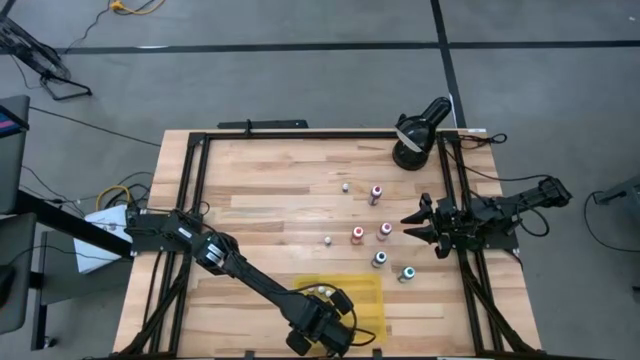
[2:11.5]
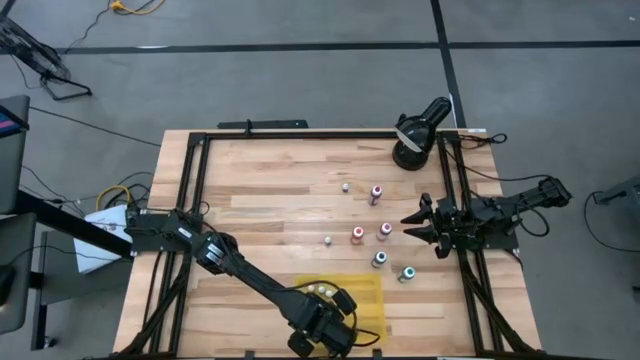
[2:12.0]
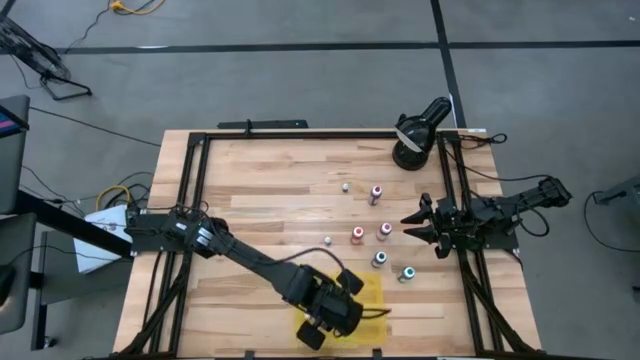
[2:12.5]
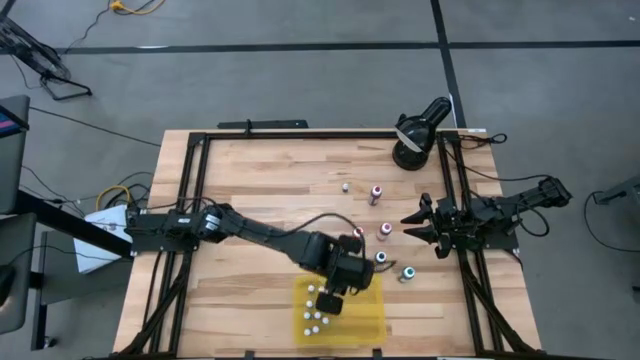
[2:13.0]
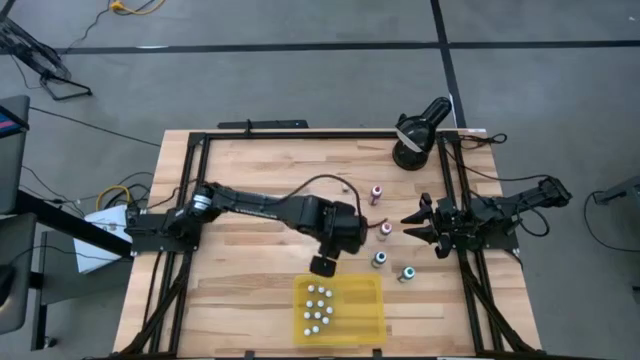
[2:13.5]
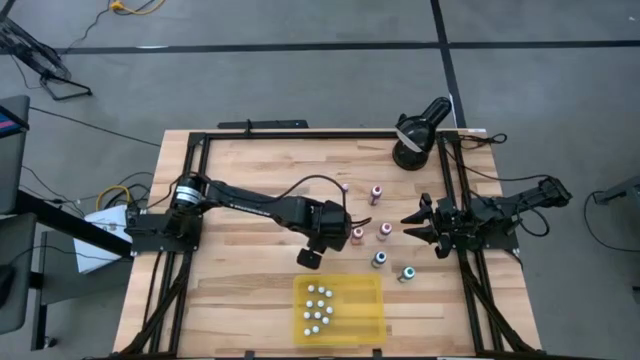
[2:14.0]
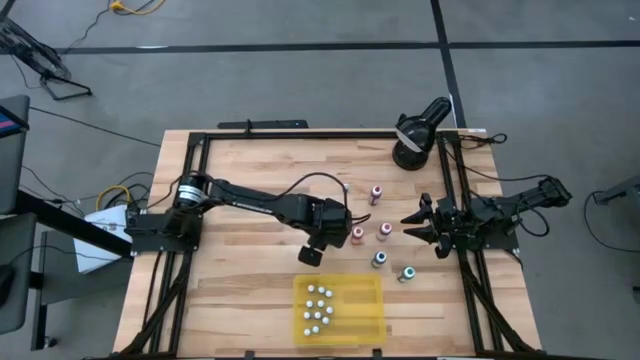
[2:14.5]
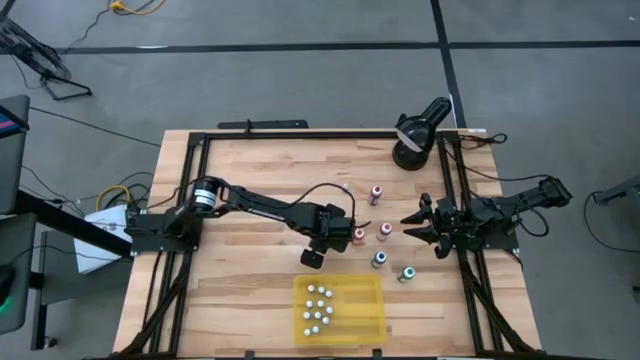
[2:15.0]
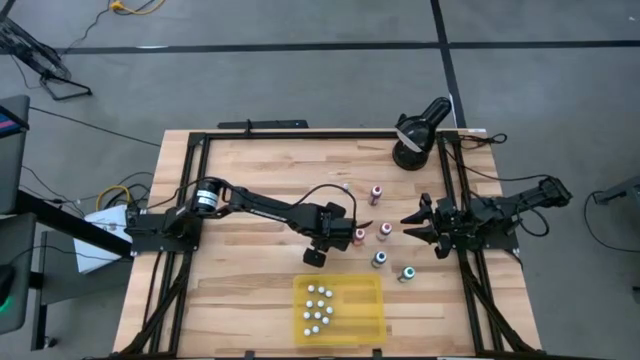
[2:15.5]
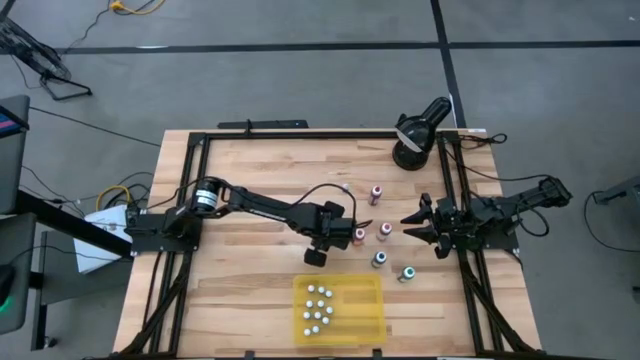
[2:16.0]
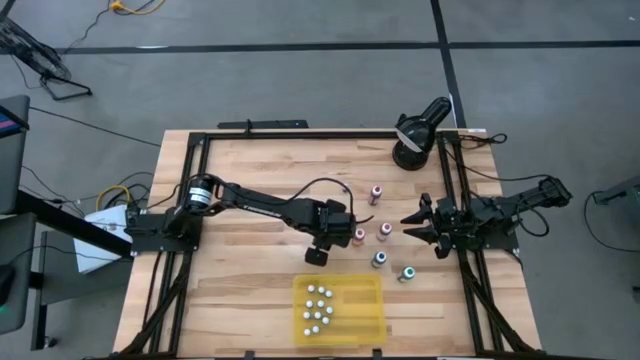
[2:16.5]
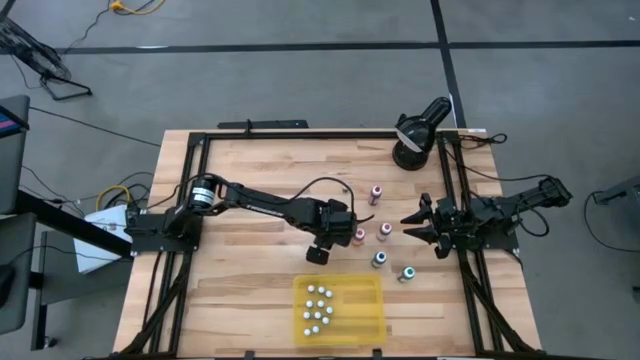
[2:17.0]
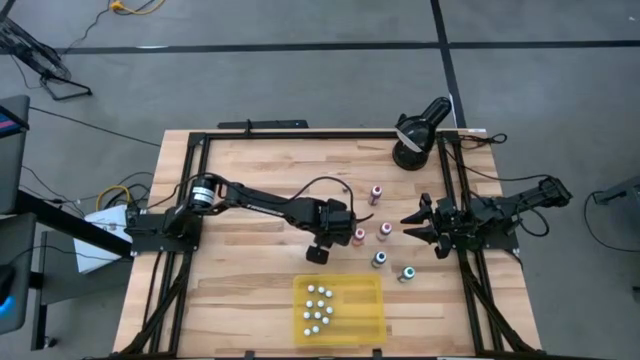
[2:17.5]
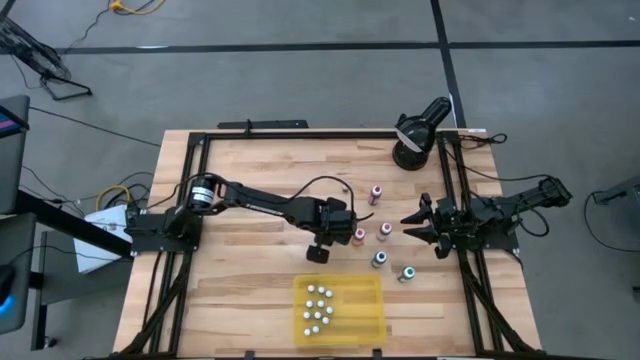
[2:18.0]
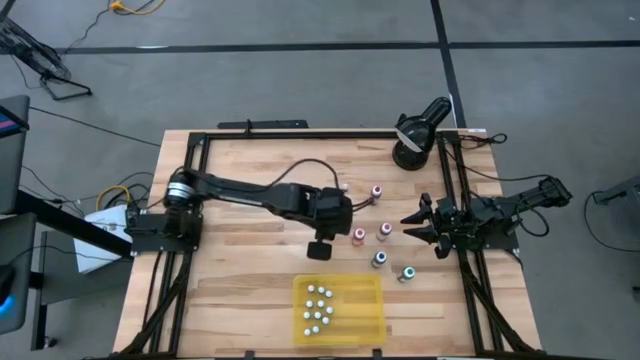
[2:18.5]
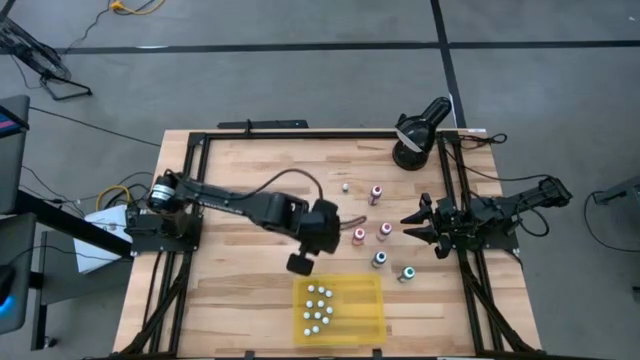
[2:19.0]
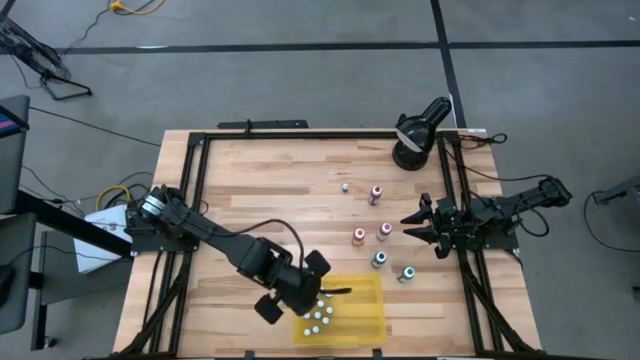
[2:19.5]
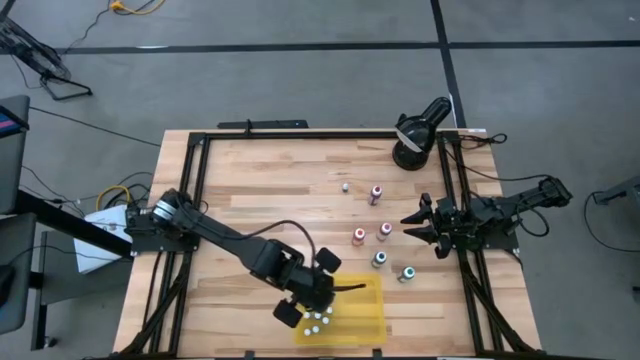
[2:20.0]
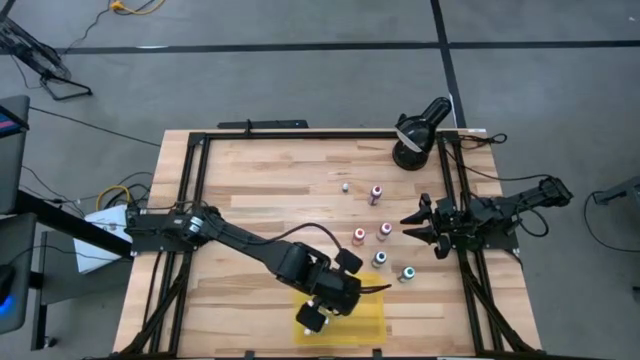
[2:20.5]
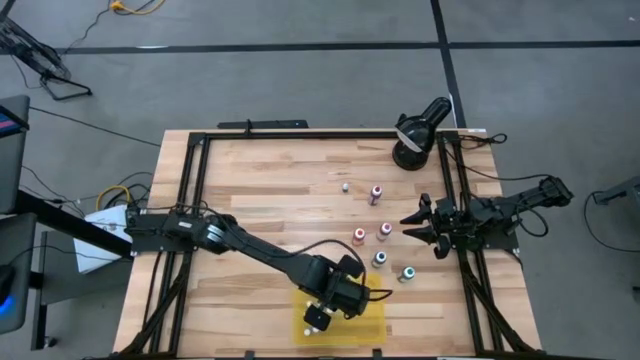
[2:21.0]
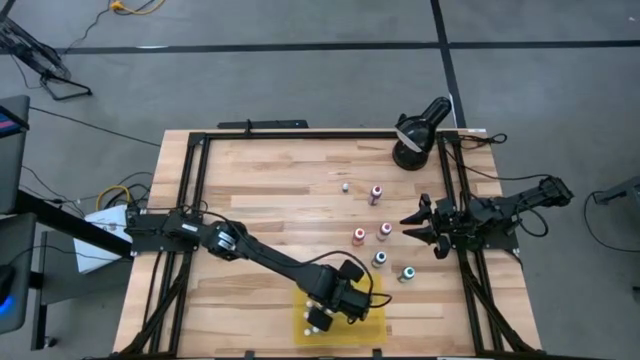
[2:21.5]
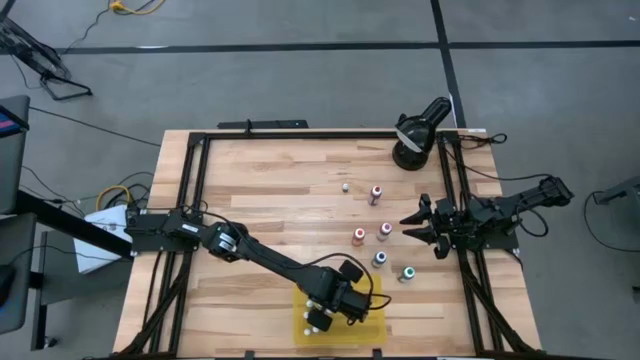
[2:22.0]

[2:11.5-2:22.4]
Task: Pick & Place food coloring
Put the small black food coloring bottle in the yellow bin

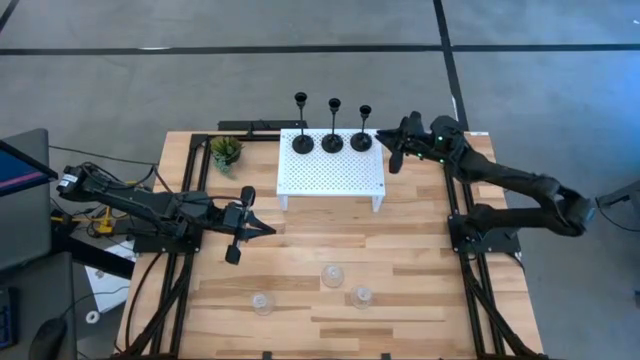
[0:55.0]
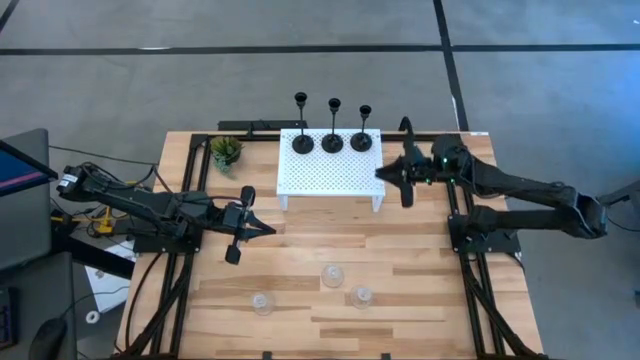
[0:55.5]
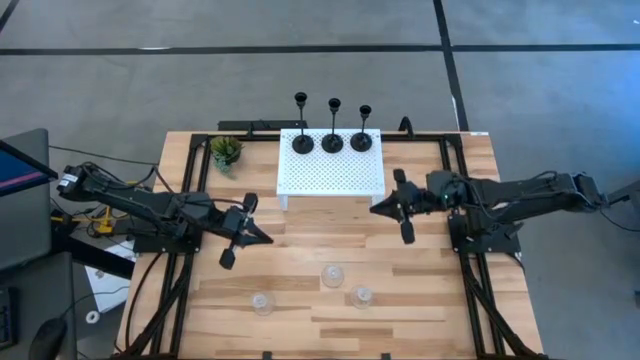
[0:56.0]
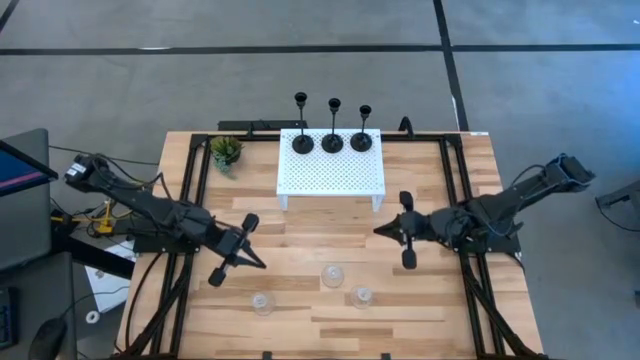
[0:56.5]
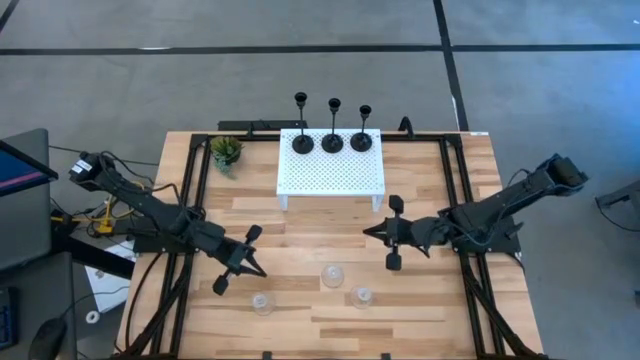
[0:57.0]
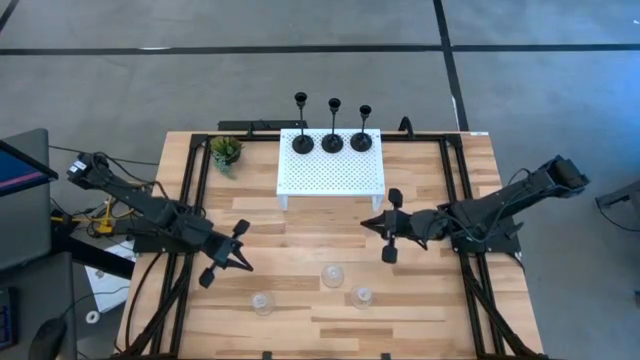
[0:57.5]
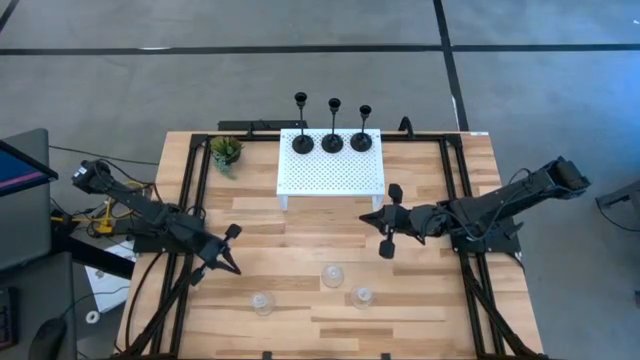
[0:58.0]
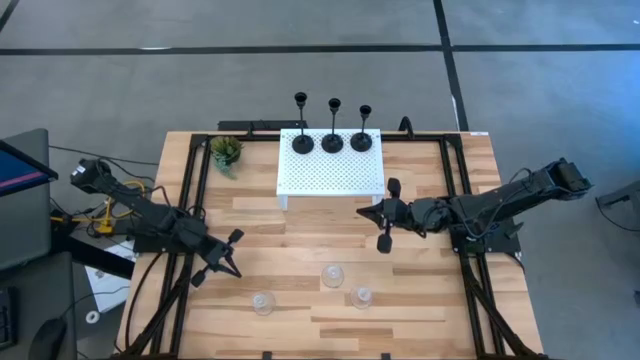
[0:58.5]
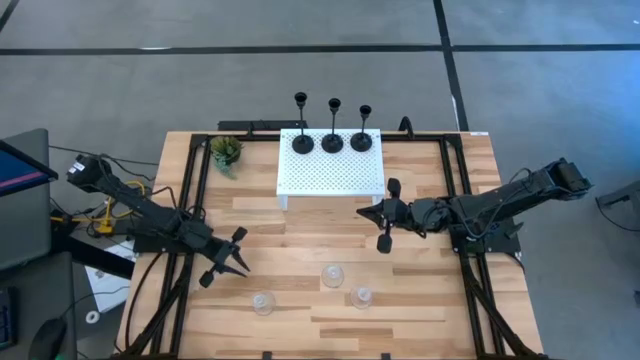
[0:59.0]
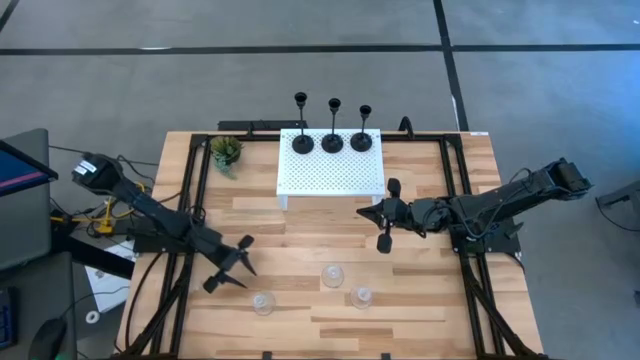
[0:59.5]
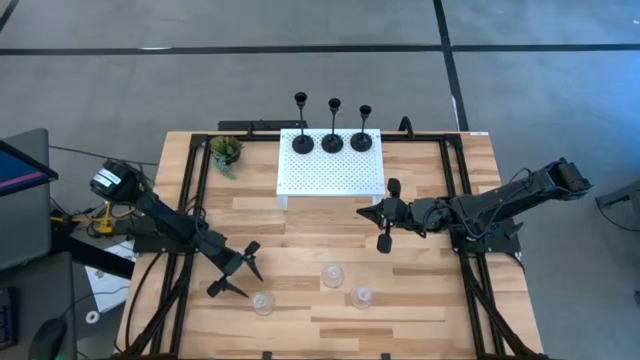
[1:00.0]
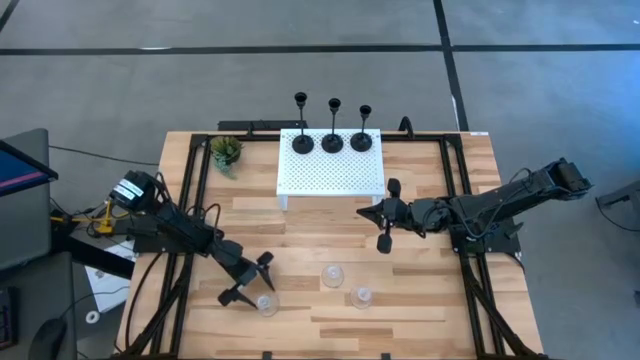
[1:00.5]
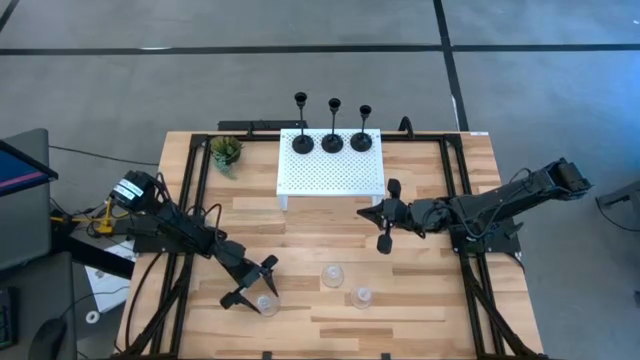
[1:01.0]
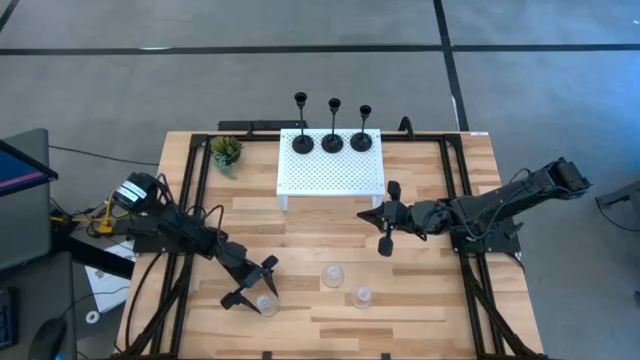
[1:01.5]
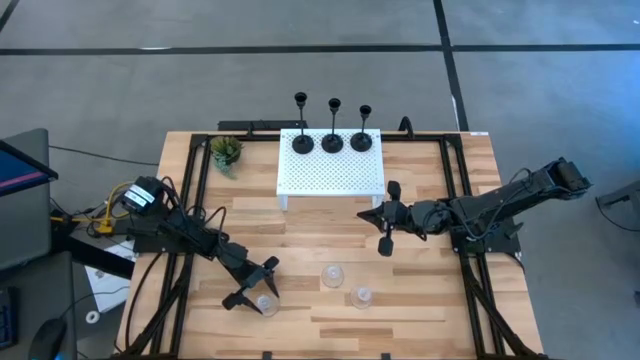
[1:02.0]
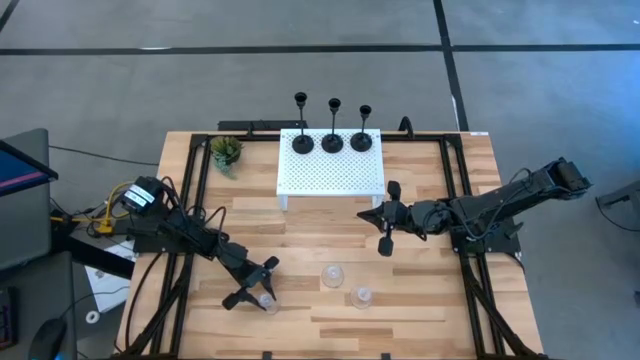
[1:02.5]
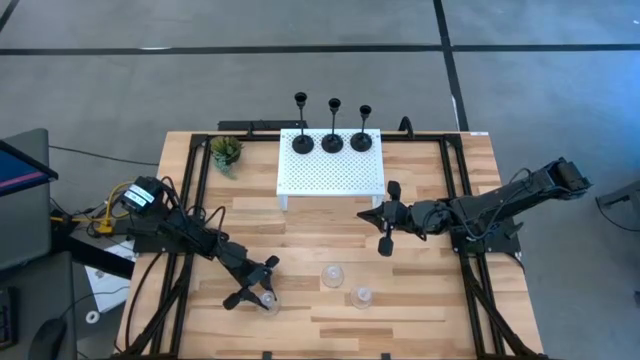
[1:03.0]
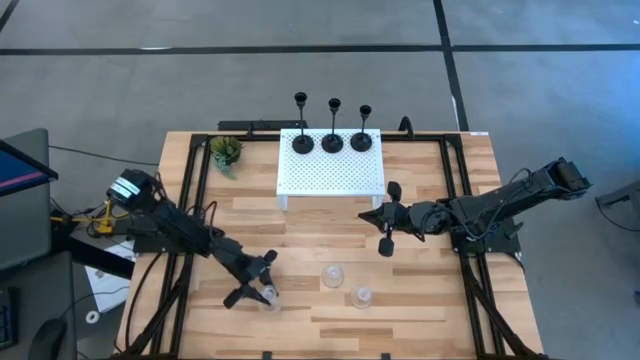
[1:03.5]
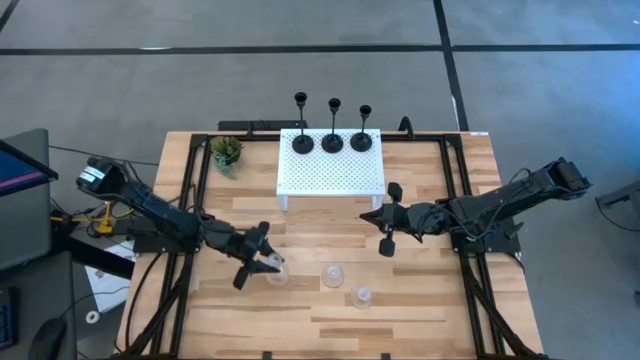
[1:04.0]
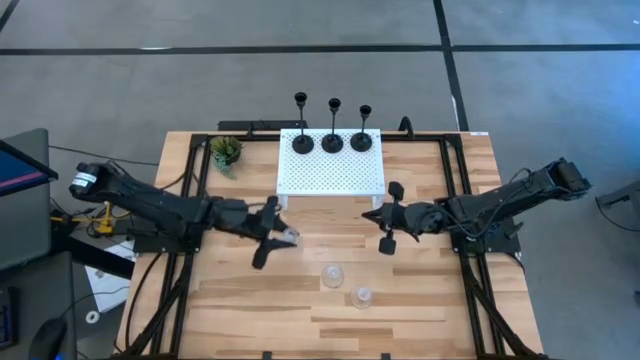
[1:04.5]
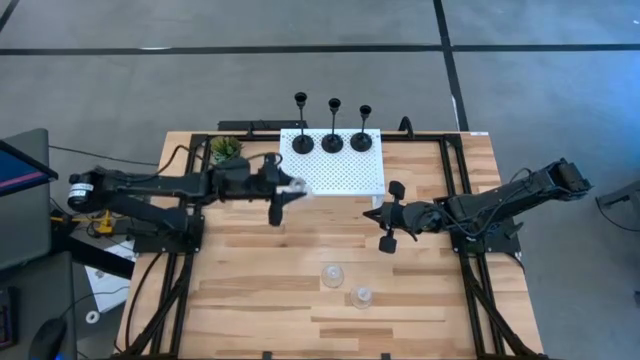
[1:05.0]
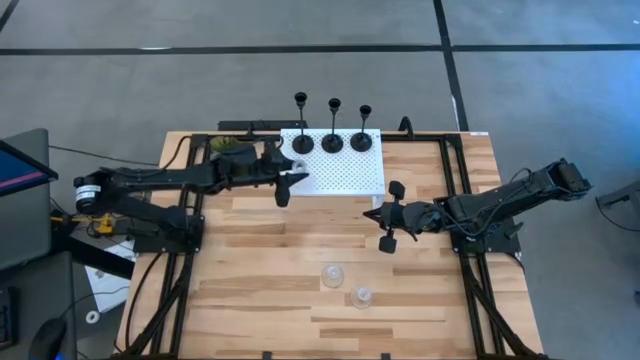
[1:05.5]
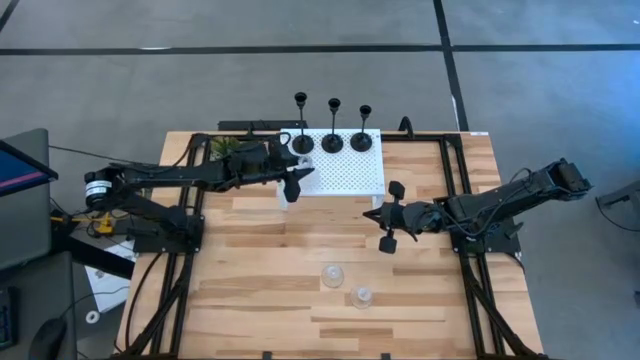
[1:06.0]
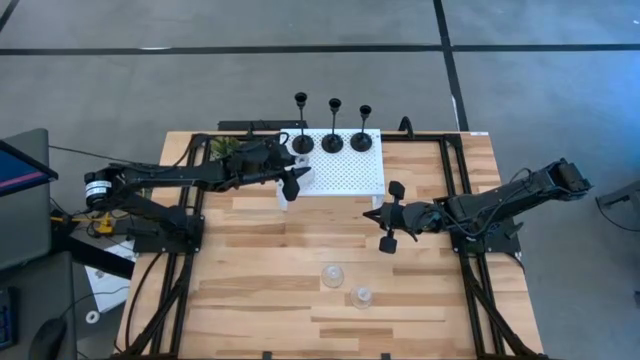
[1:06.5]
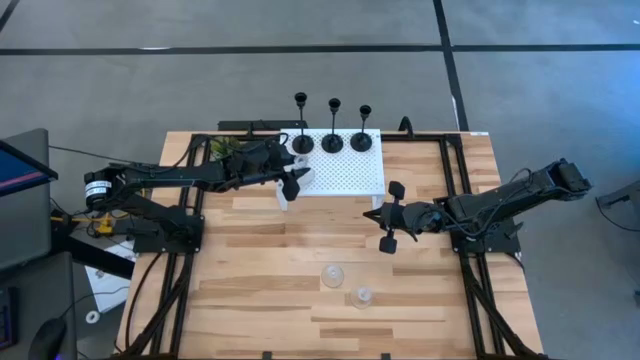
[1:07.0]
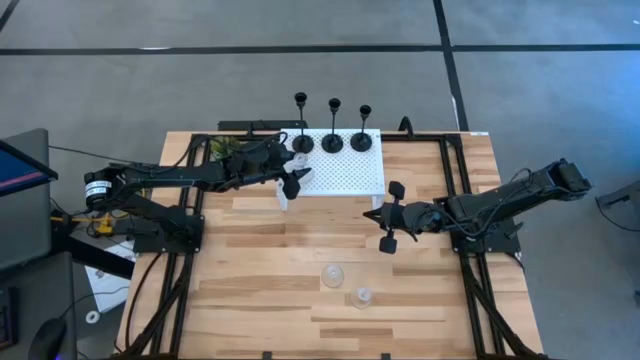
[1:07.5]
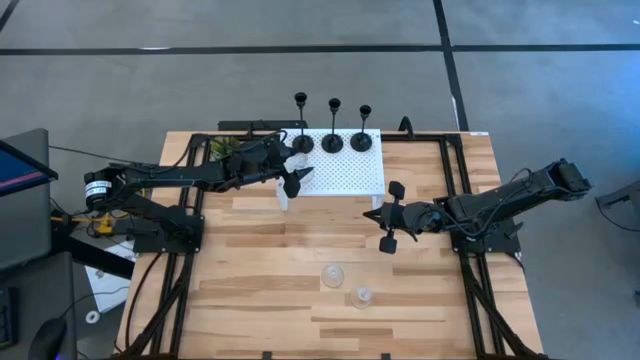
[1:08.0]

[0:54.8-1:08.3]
Task: Pick & Place candle stick holders
Put the left transparent candle holder on the shelf
